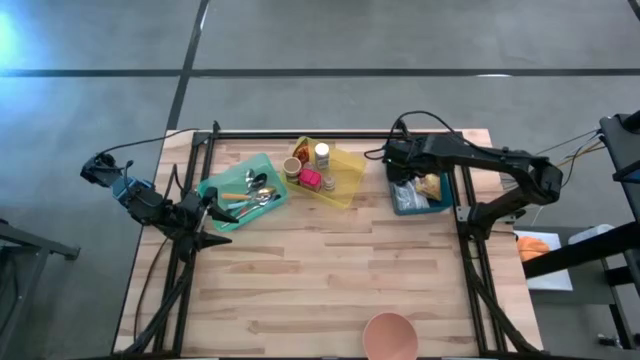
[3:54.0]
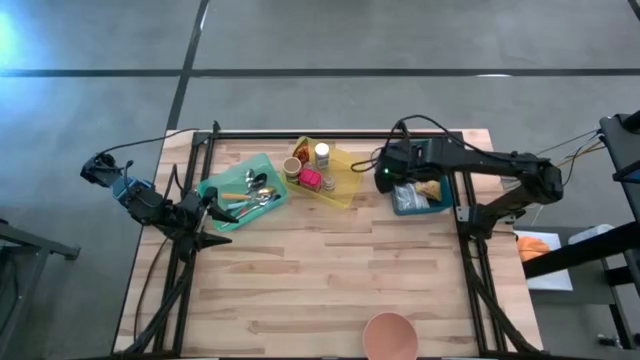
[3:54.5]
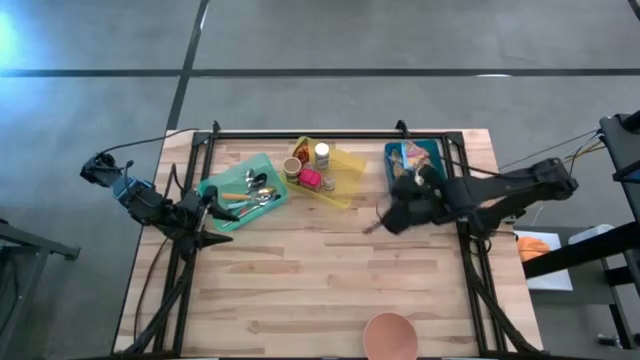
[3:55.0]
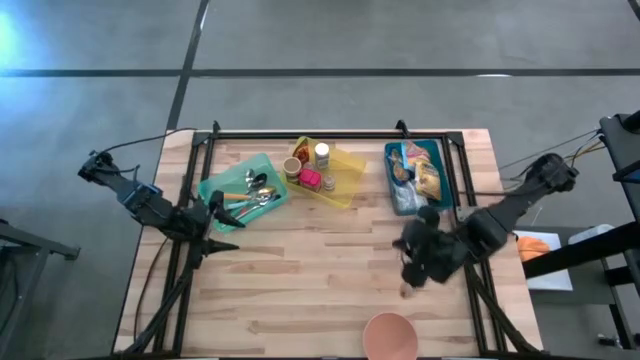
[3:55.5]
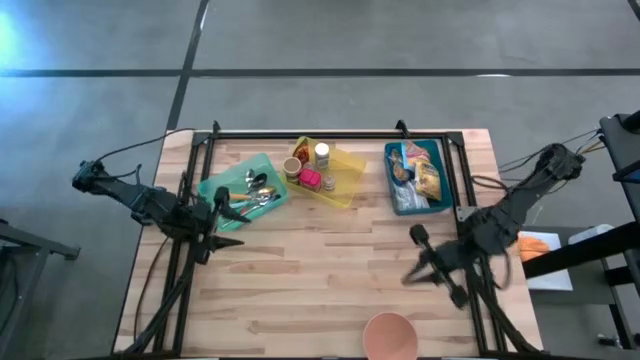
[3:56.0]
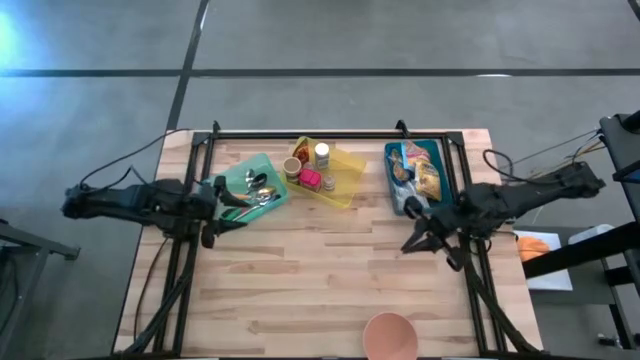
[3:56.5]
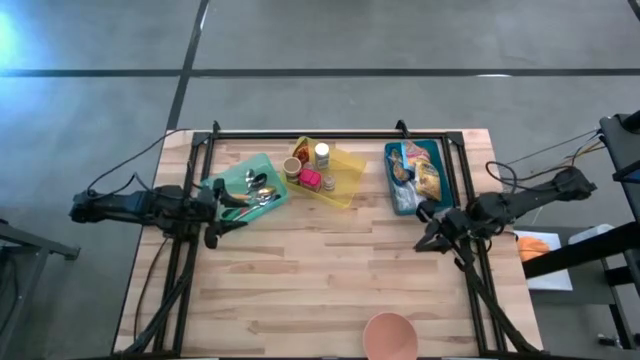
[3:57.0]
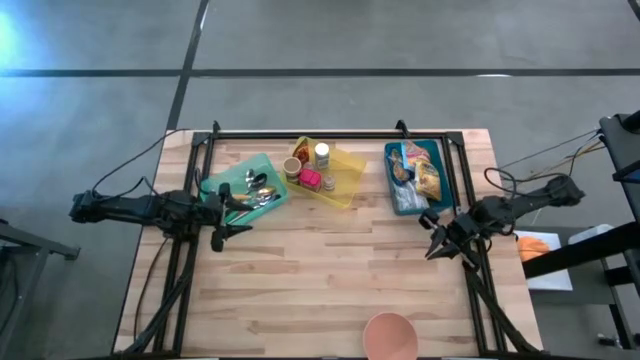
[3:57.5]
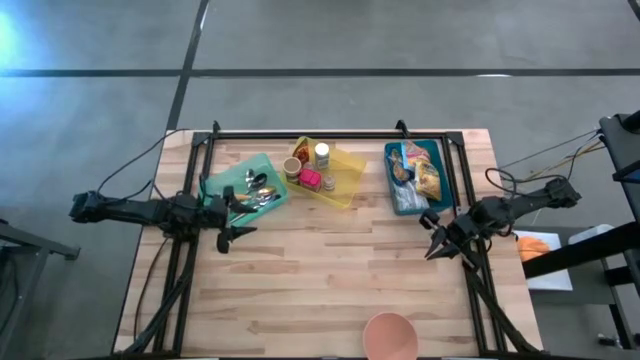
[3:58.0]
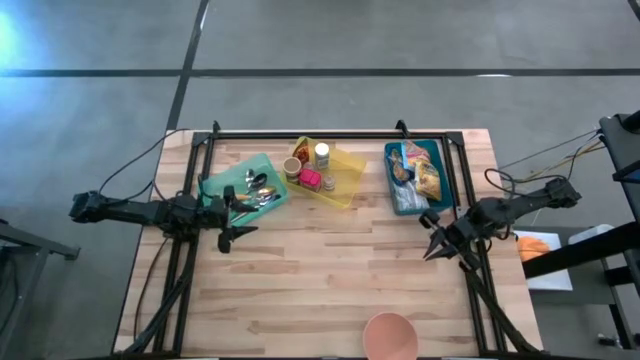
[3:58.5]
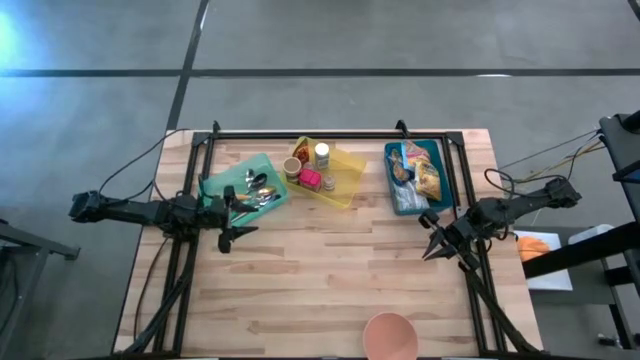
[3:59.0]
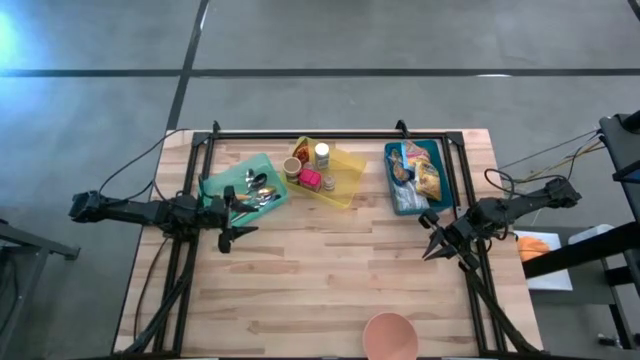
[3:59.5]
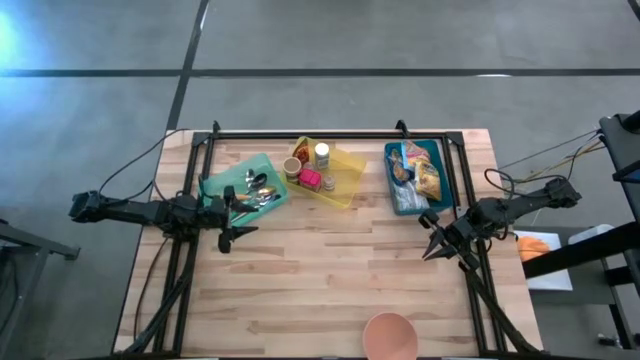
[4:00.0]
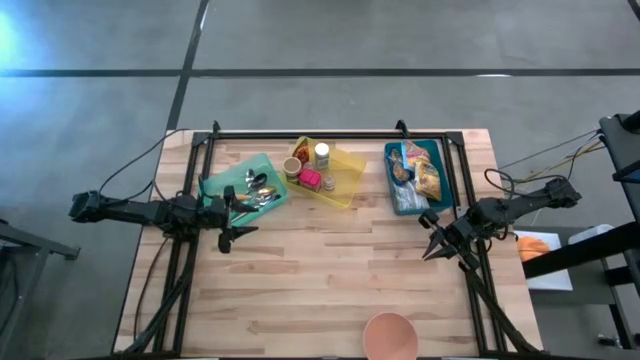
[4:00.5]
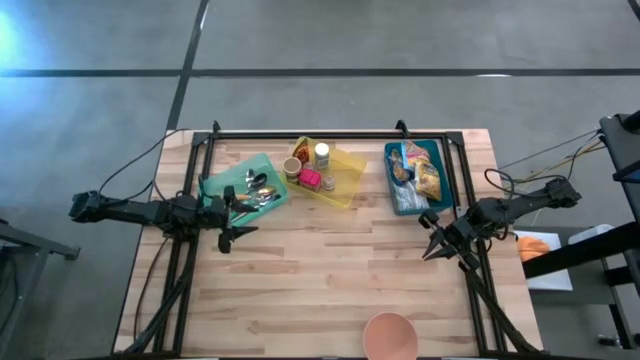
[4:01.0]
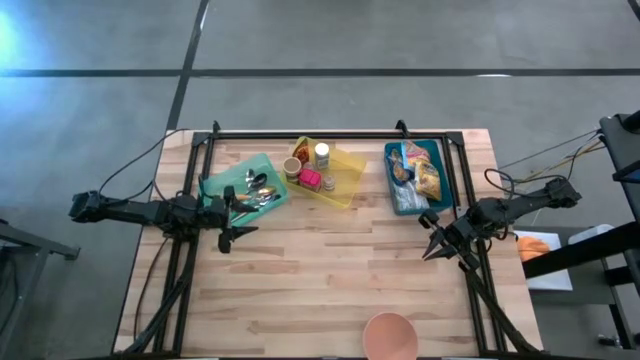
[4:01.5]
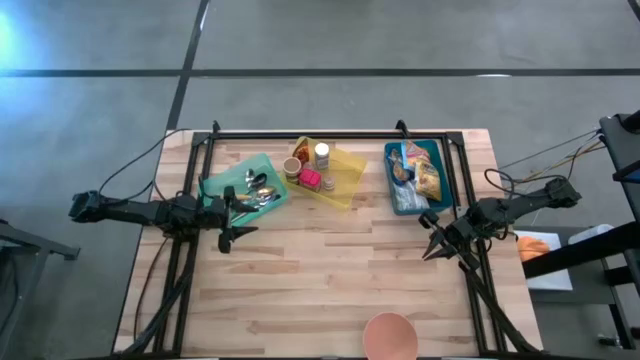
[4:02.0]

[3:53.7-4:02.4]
Return to Home Position
